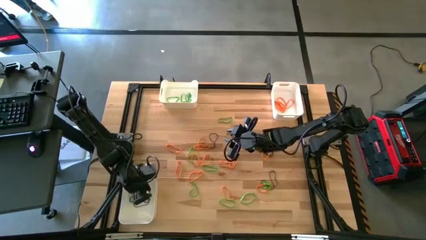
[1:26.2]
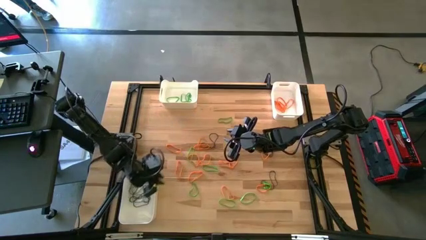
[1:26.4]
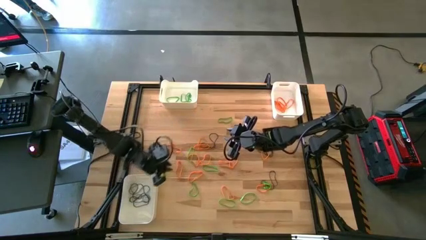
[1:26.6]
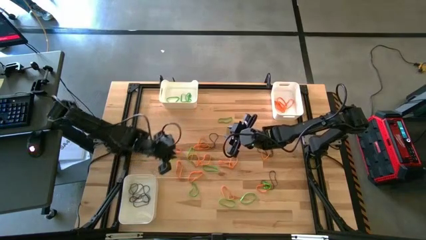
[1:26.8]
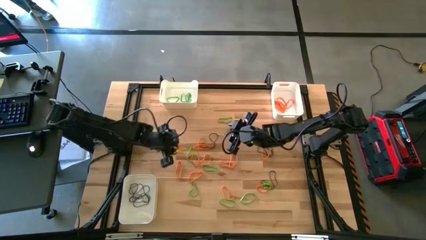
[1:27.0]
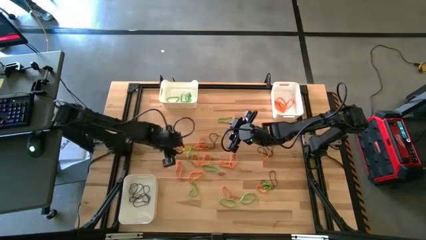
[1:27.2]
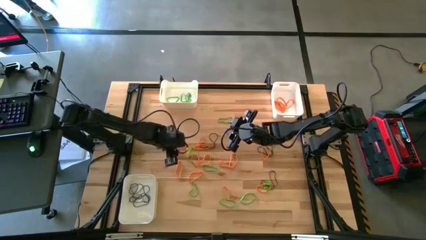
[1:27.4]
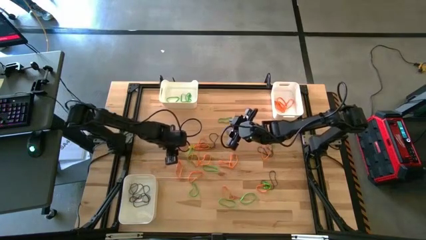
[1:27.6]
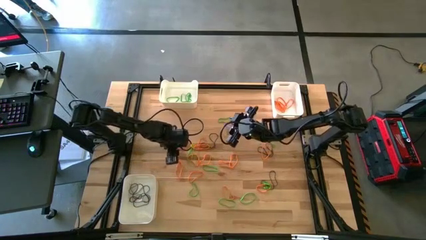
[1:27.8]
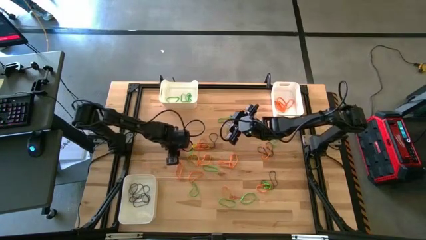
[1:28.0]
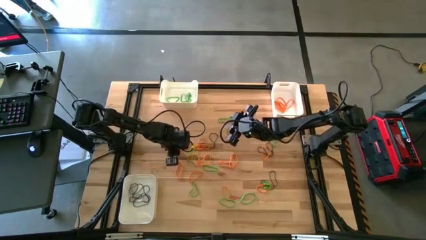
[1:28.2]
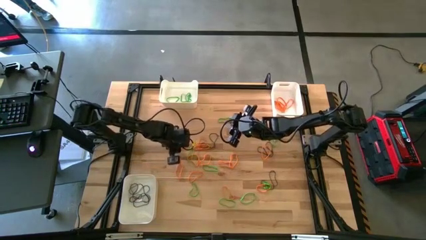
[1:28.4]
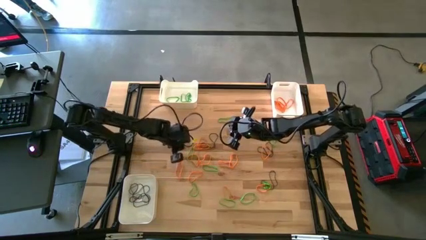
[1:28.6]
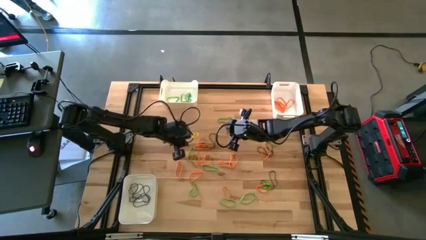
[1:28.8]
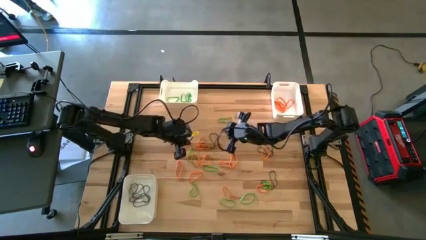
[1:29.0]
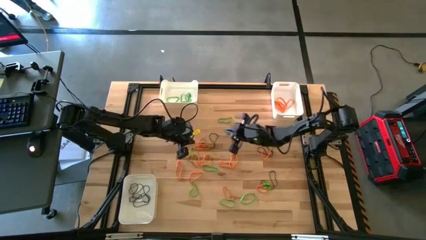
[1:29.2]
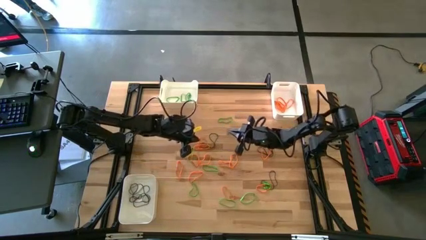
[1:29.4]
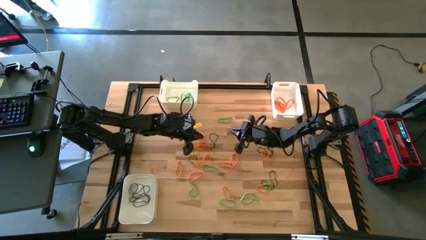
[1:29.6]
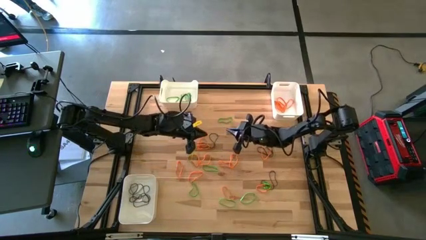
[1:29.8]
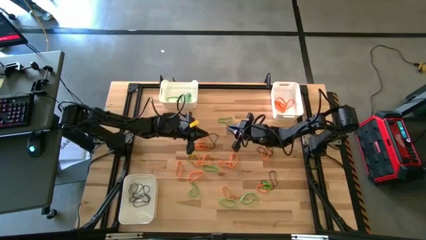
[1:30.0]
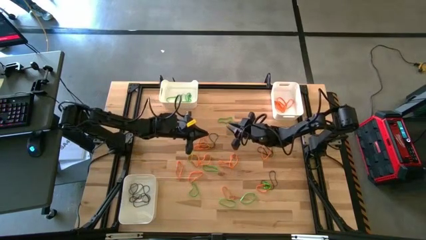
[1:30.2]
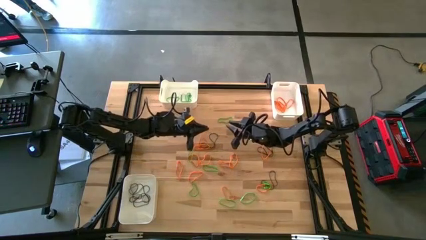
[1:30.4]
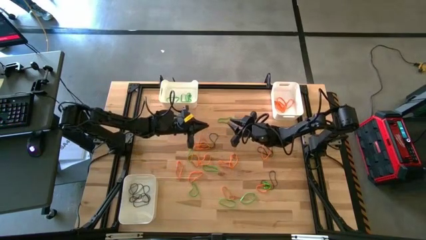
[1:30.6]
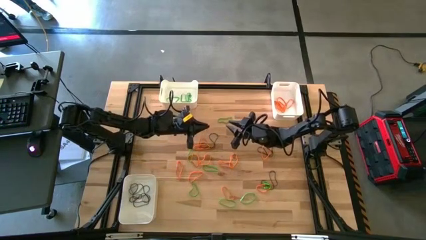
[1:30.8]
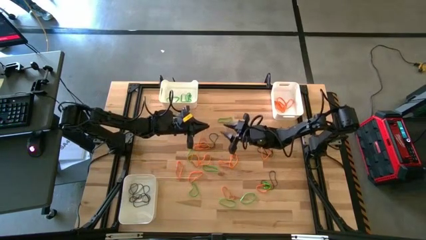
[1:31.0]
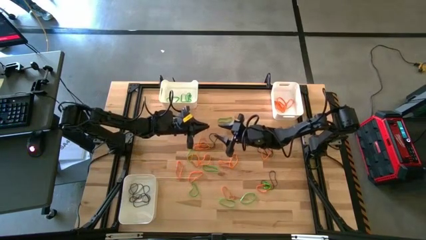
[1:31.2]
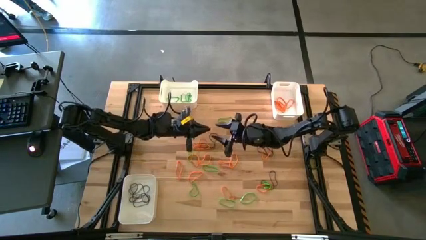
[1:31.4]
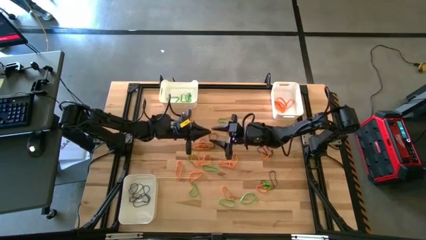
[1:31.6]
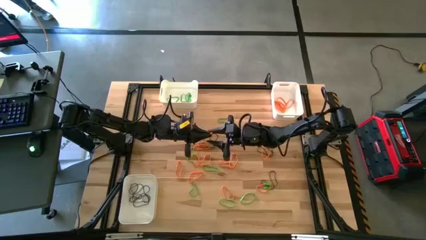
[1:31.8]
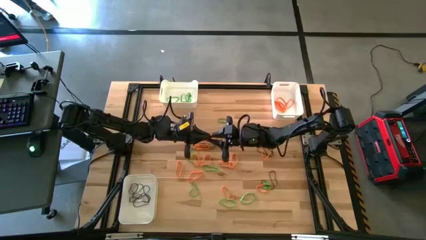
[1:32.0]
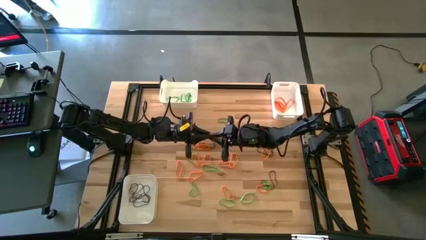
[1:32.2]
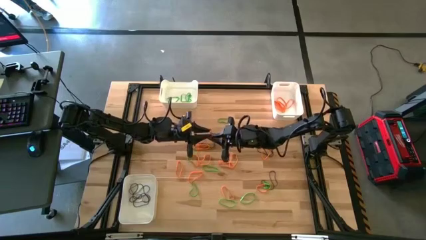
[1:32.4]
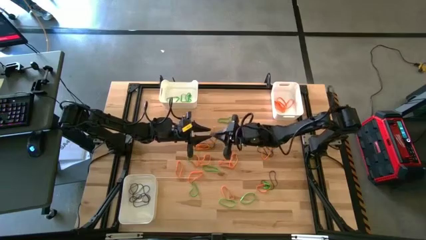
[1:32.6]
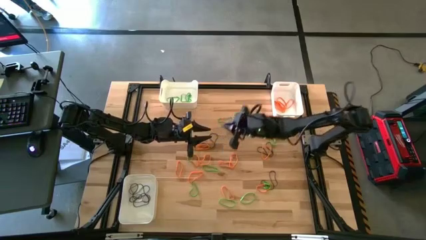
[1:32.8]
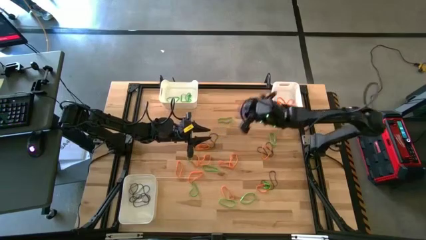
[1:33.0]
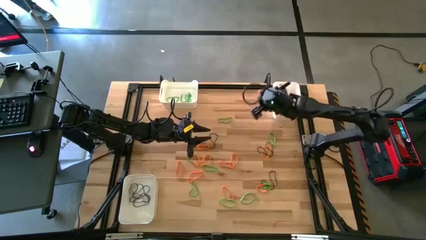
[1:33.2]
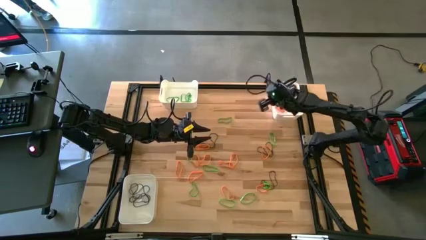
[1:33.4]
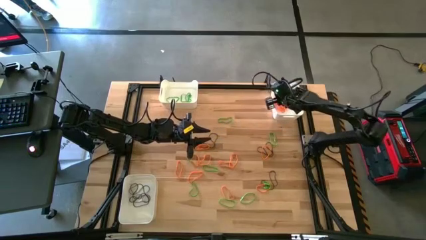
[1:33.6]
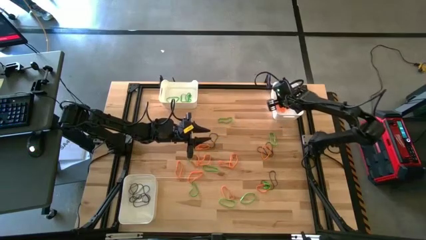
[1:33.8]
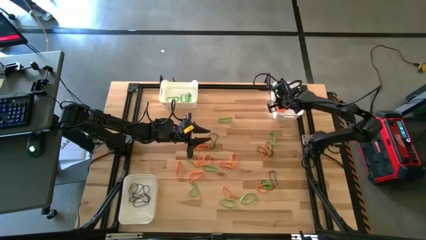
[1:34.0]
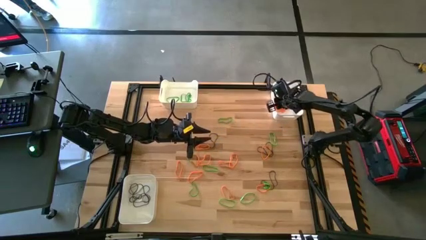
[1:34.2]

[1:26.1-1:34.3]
Task: Sort rubber bands into baskets
Put the orange rubber band into the top right white bin

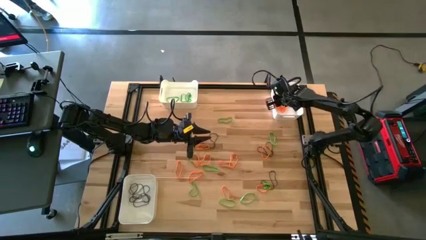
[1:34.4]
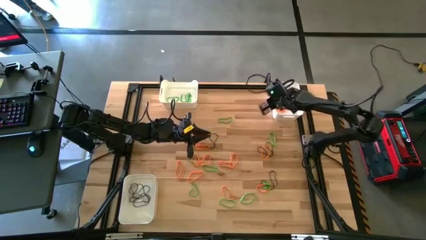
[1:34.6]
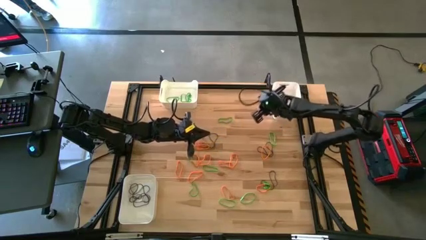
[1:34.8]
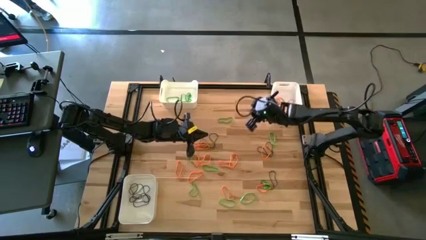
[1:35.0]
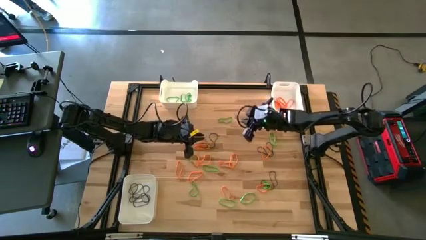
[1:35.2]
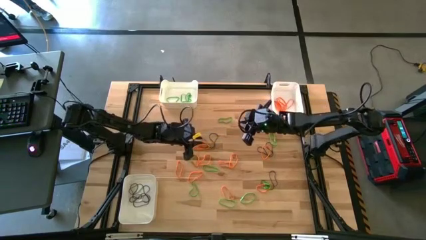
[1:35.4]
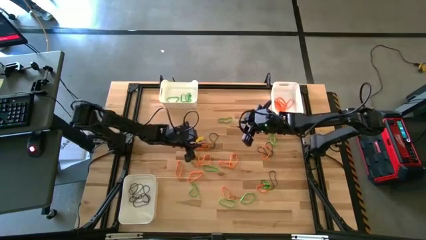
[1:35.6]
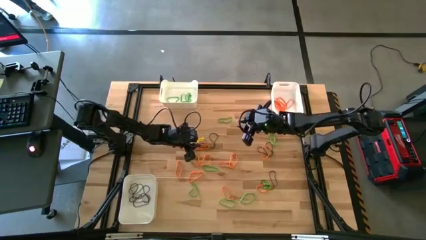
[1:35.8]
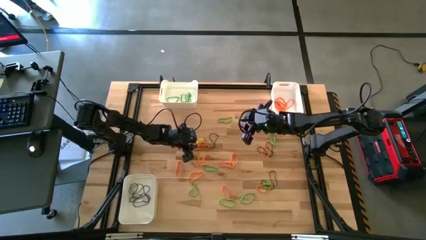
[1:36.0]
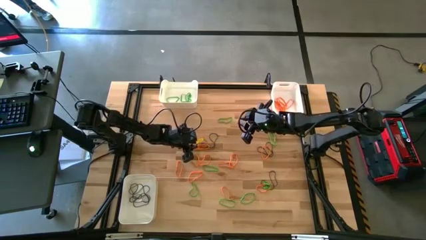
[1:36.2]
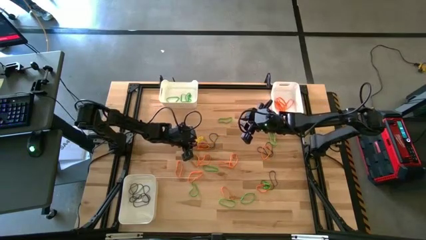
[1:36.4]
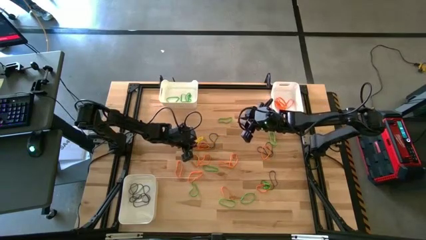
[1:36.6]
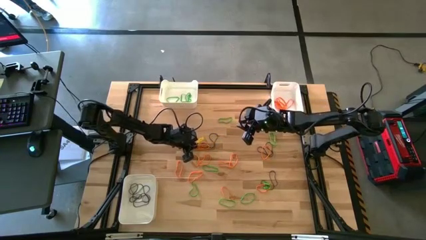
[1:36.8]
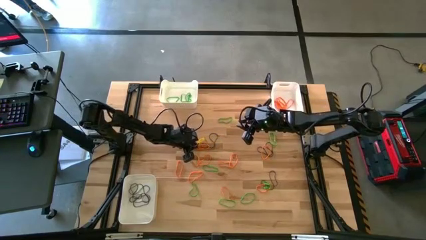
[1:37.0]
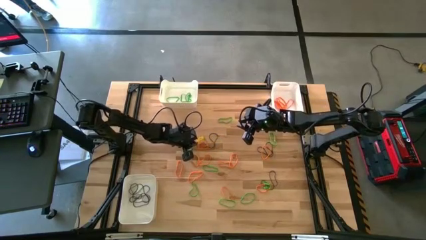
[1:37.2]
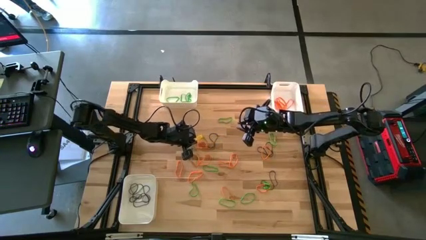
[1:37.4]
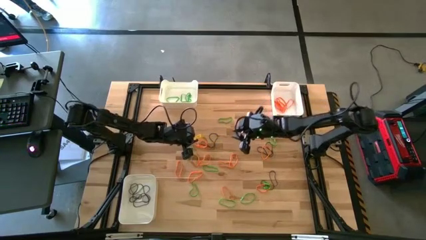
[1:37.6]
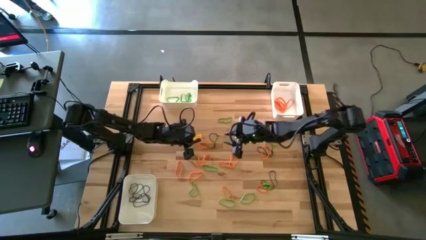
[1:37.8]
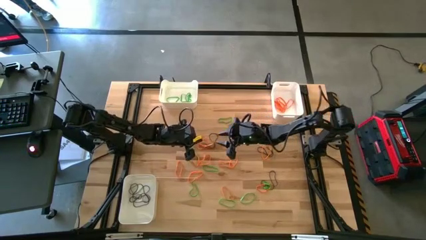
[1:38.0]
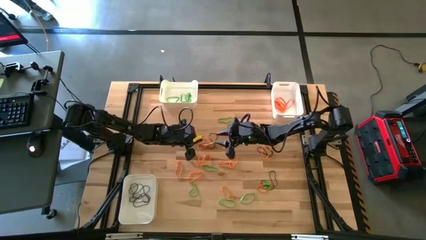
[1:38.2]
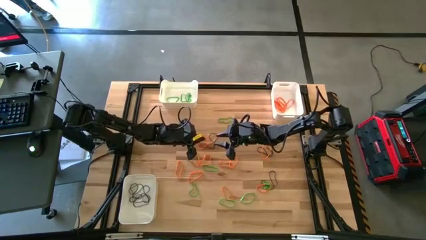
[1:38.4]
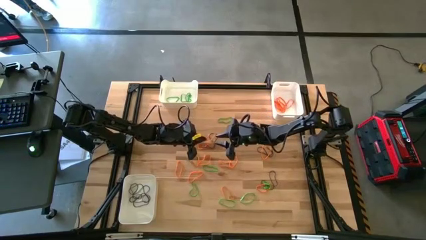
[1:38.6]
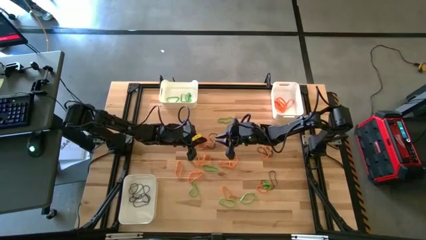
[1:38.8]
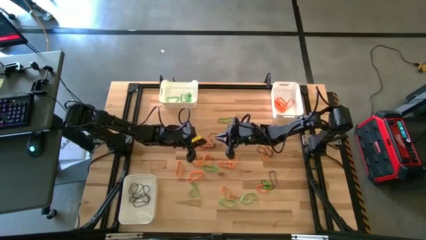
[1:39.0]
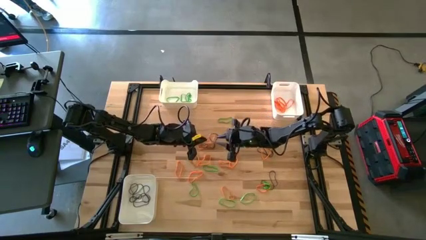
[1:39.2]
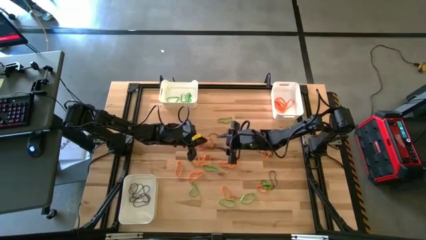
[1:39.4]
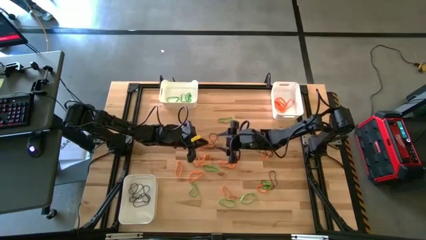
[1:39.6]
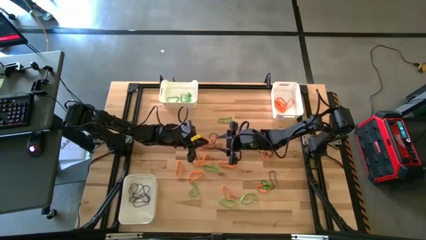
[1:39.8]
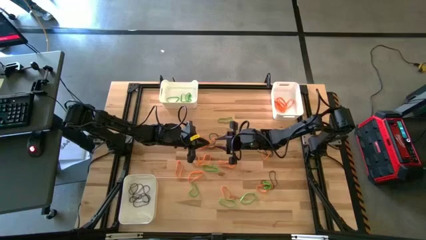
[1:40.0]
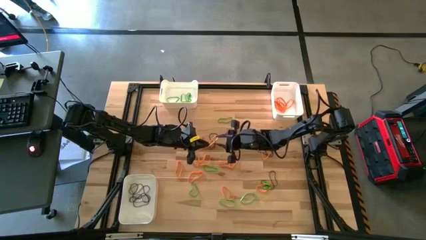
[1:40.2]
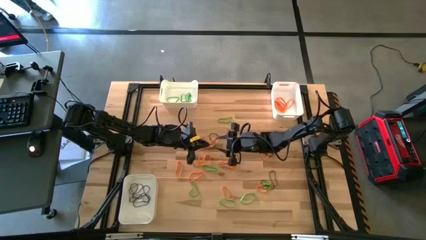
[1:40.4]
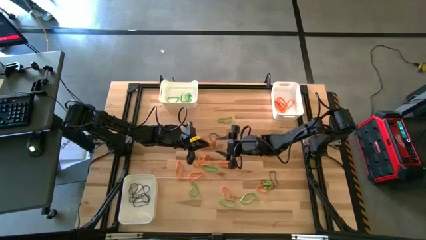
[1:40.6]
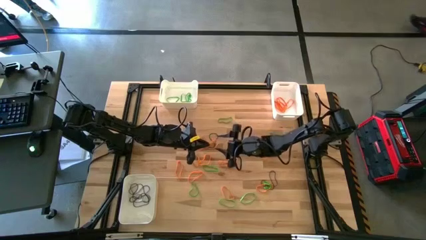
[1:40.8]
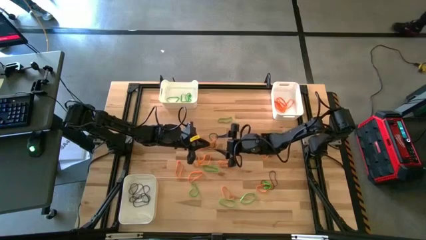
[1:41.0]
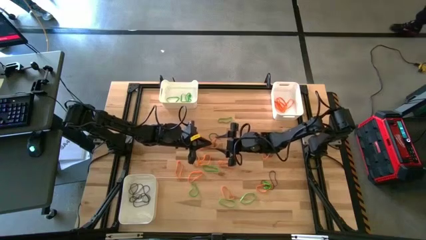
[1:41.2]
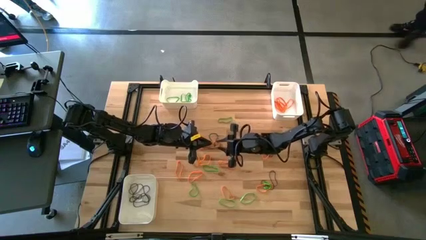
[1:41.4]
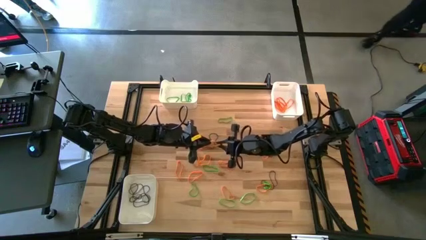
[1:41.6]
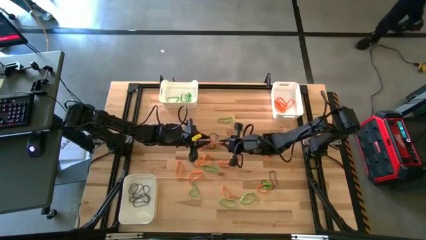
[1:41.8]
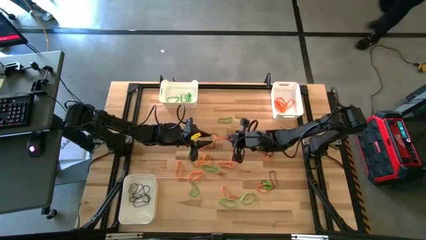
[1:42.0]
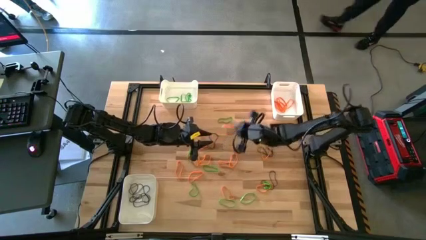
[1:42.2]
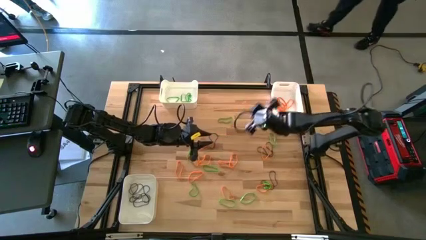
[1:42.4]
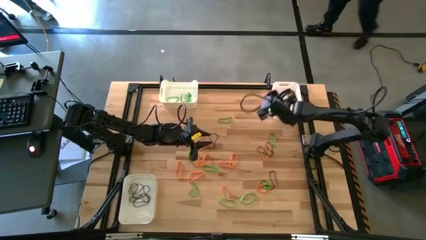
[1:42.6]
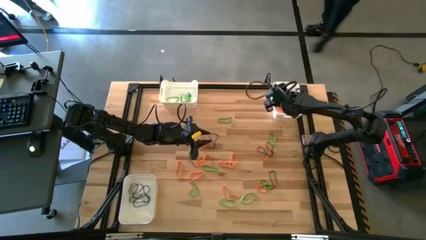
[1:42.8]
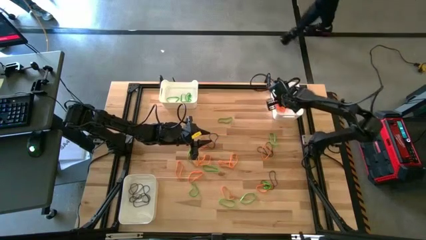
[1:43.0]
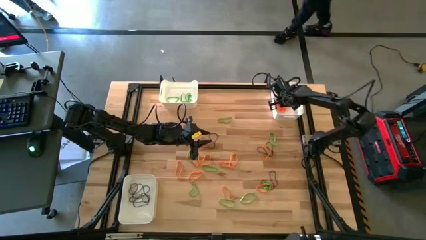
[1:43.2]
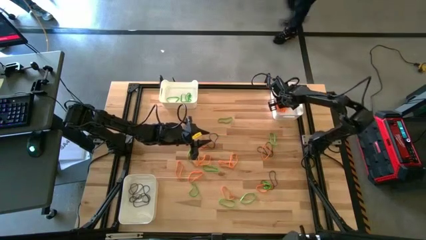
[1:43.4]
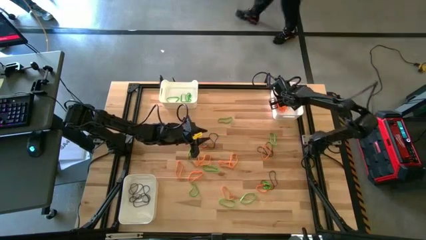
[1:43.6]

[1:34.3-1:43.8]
Put the orange rubber band into the top right white bin
